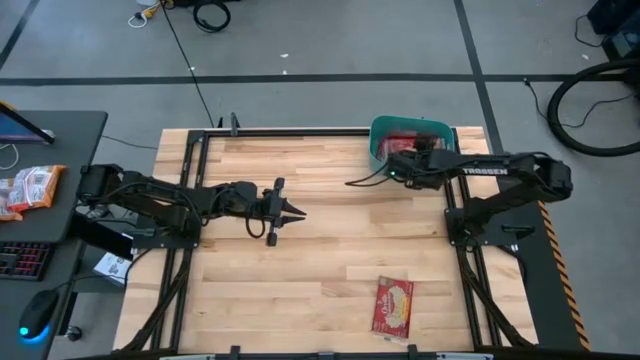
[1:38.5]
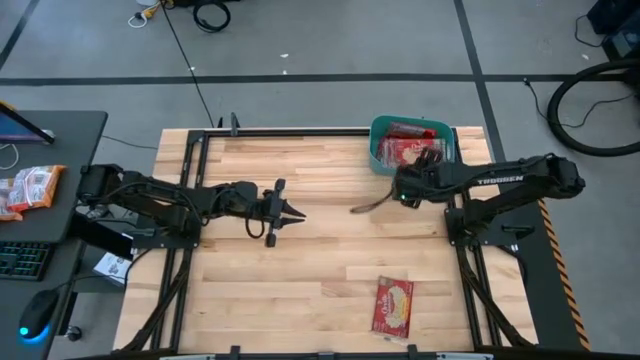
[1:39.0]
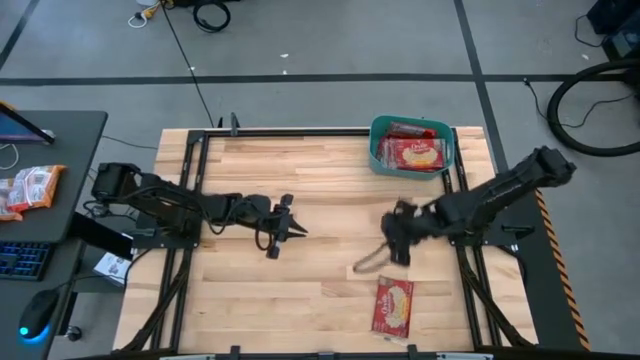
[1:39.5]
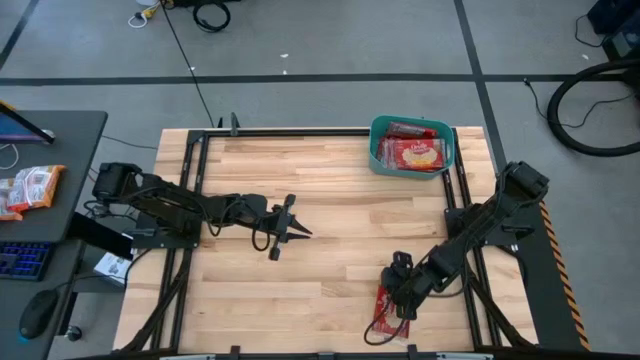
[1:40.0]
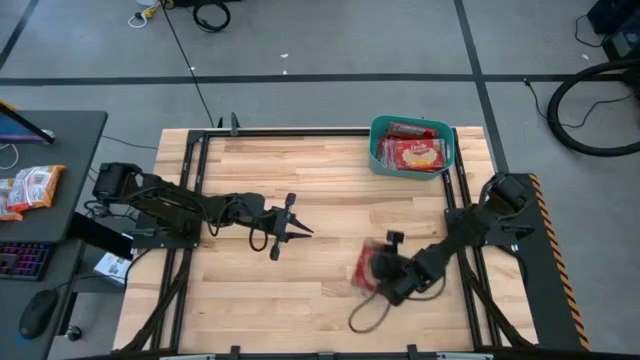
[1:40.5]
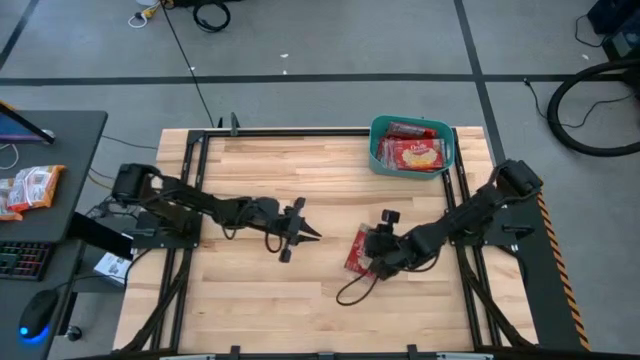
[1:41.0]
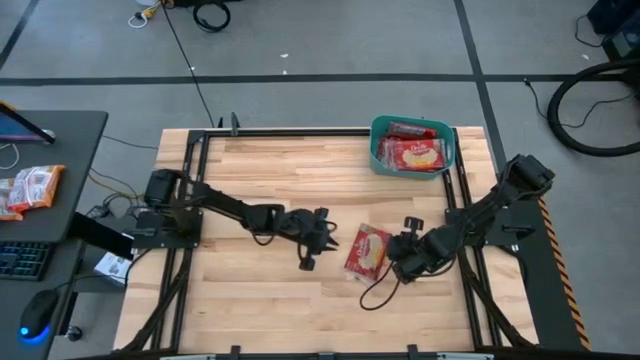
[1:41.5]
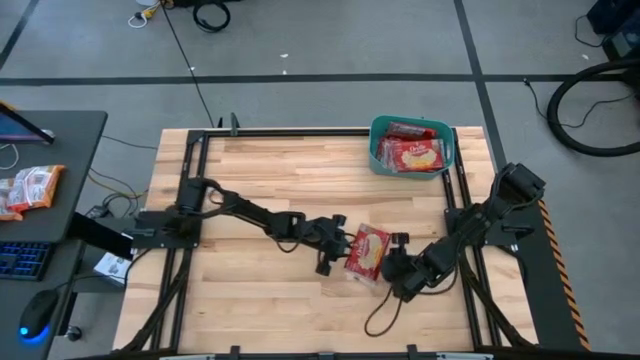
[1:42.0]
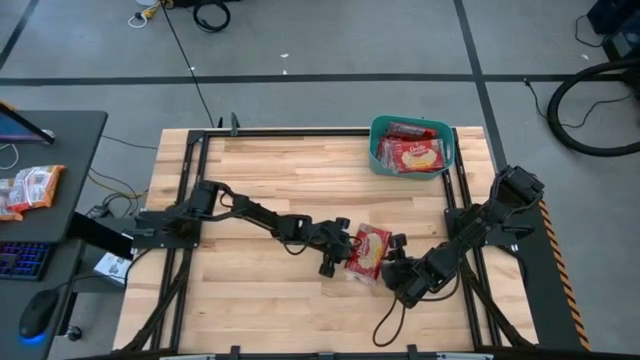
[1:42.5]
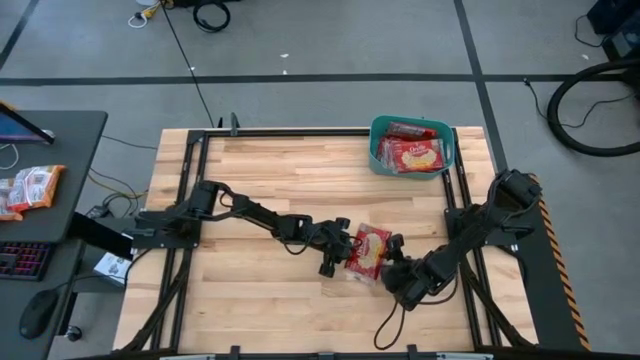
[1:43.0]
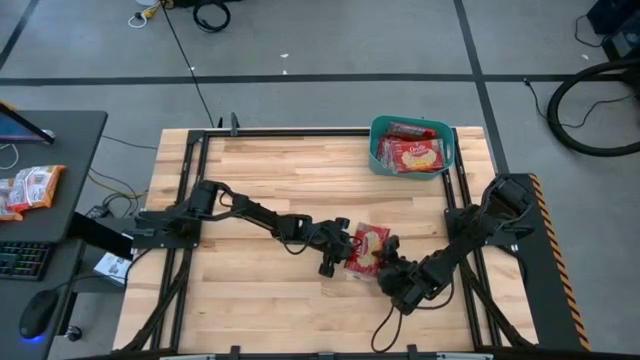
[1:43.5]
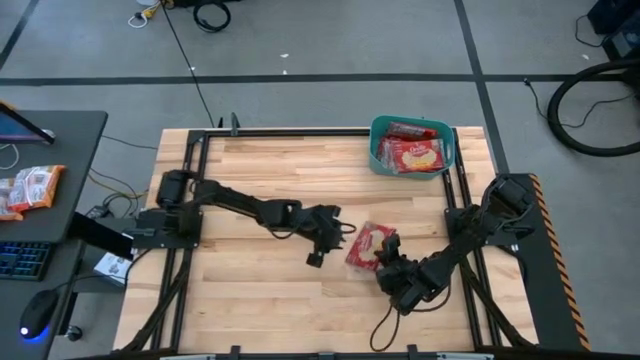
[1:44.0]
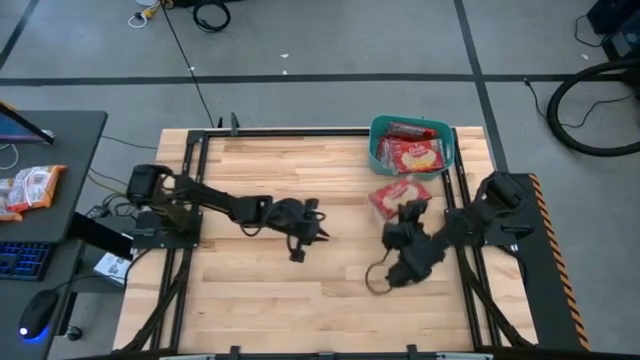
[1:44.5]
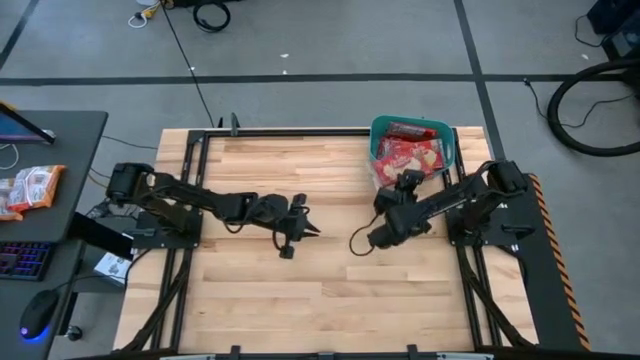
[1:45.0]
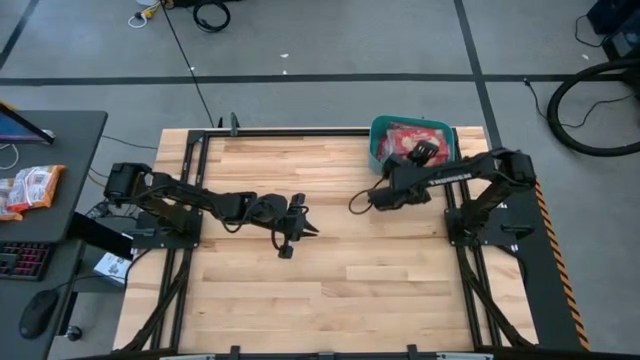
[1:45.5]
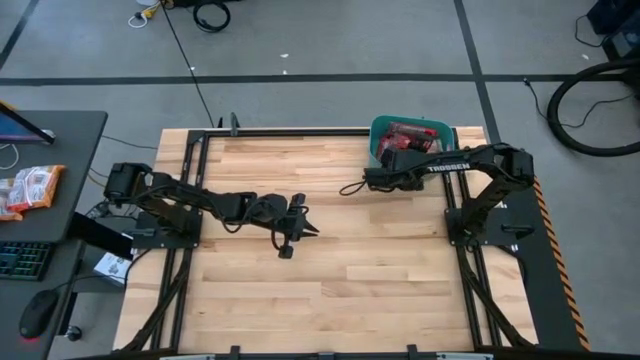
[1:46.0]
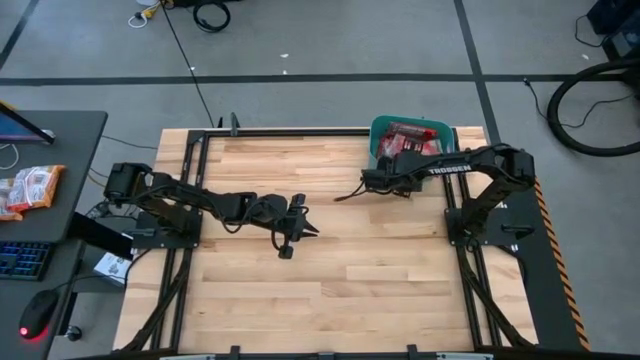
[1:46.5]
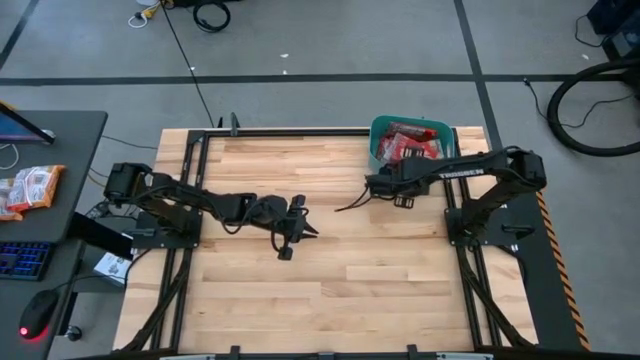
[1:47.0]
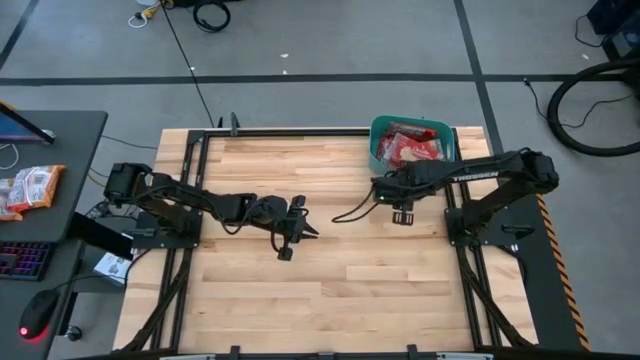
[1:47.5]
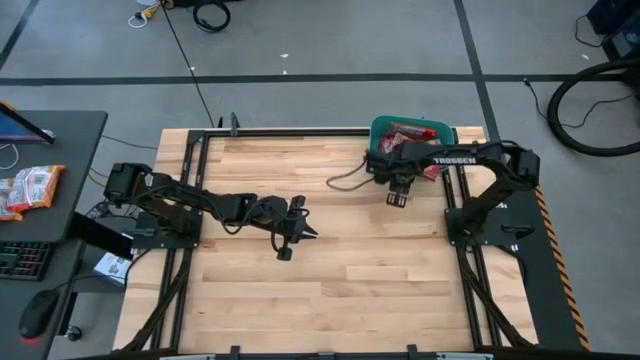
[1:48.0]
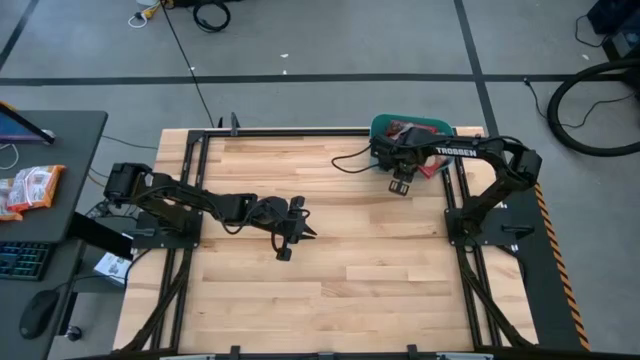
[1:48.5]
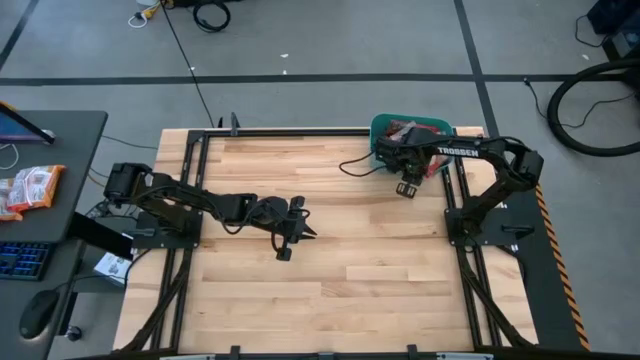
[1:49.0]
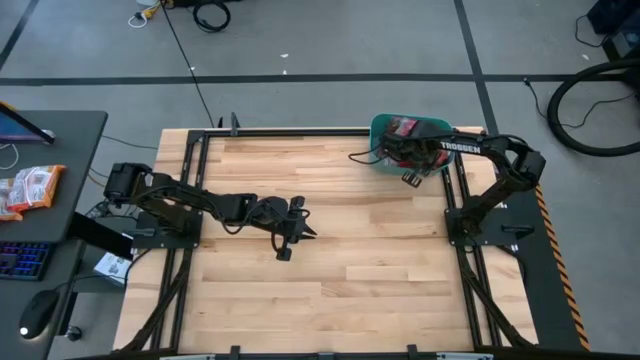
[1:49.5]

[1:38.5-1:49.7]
Task: Sort popcorn bags into baskets
Put the popcorn bag into the blue bin

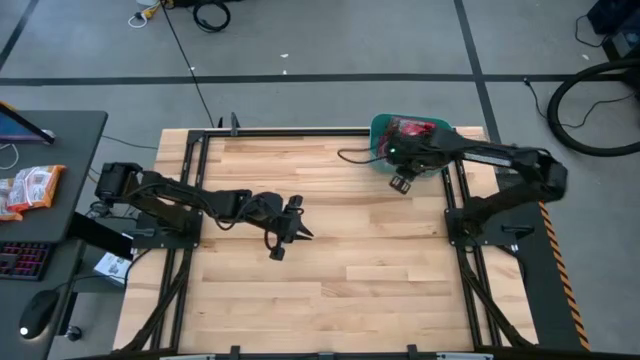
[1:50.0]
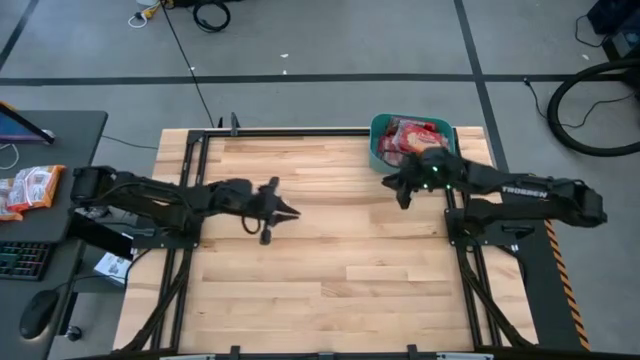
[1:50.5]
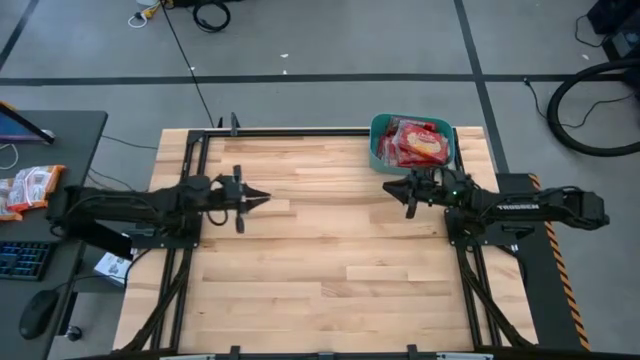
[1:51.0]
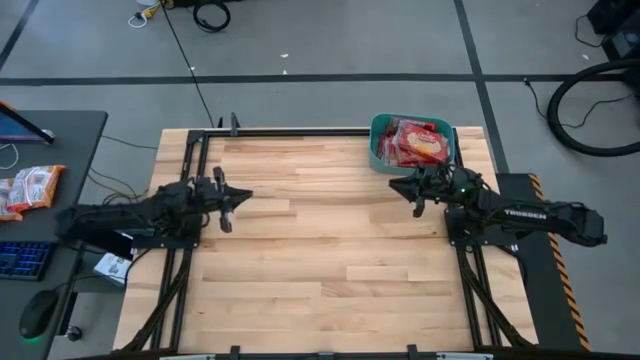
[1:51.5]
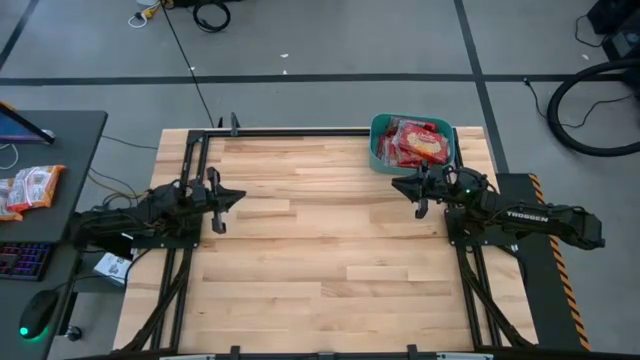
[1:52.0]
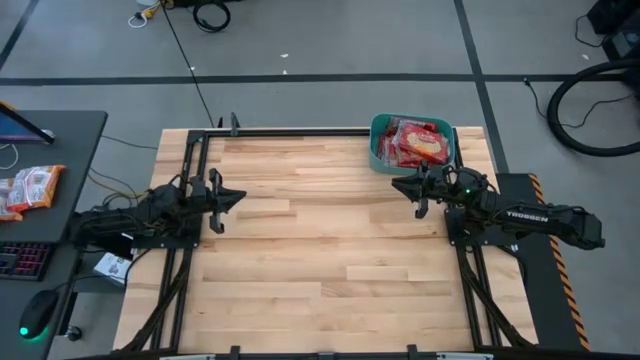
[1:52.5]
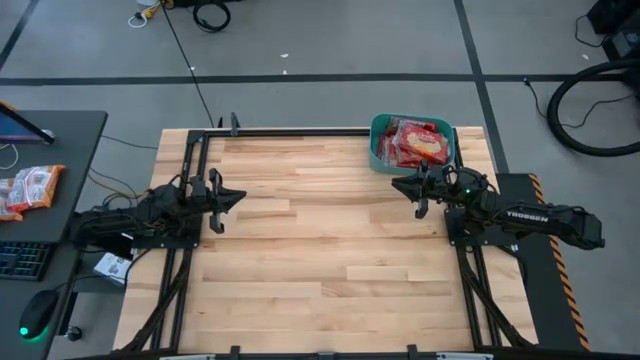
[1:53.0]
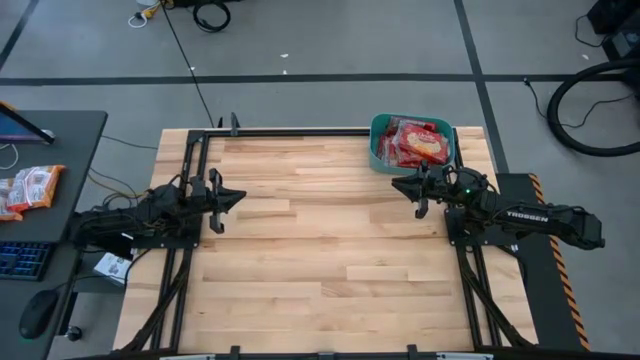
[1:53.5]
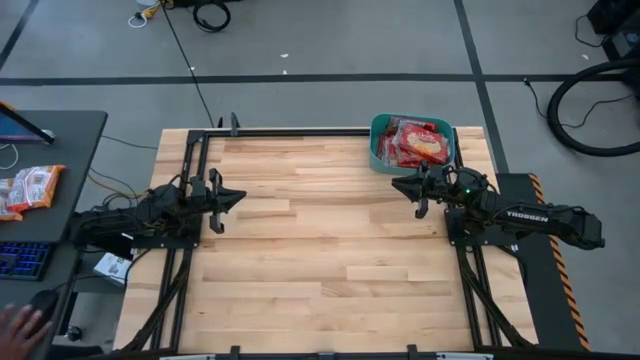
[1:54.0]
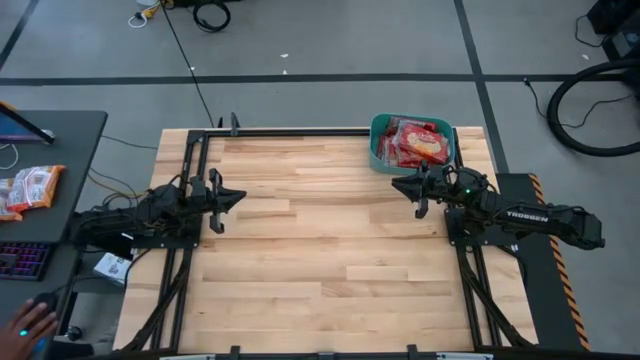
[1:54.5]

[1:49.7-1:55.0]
Return to Home Position

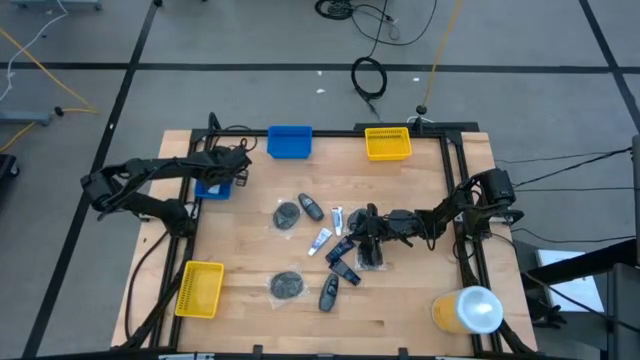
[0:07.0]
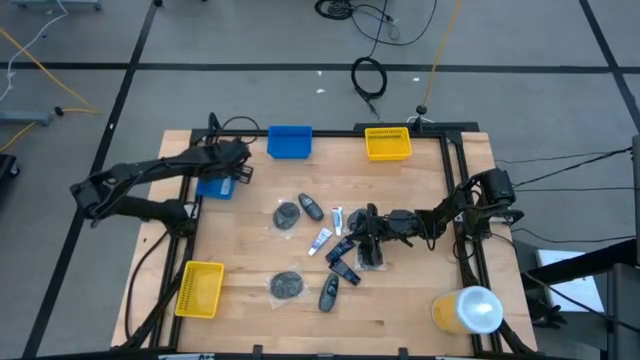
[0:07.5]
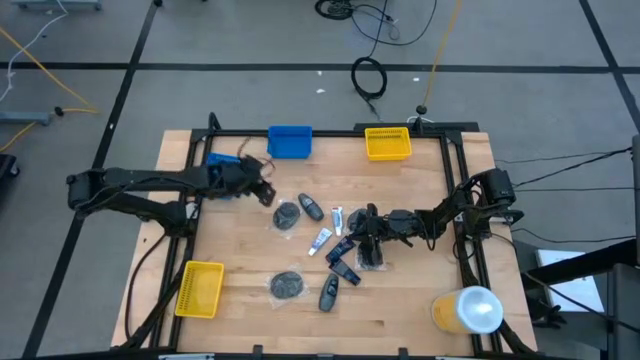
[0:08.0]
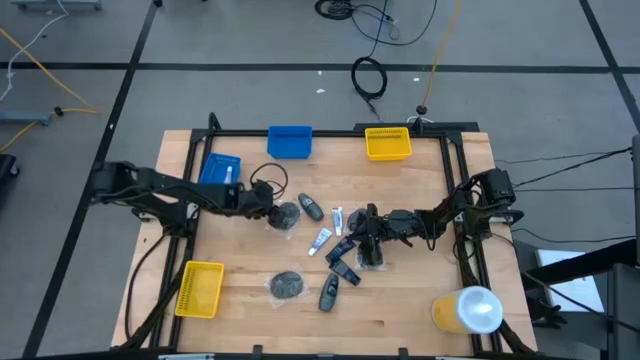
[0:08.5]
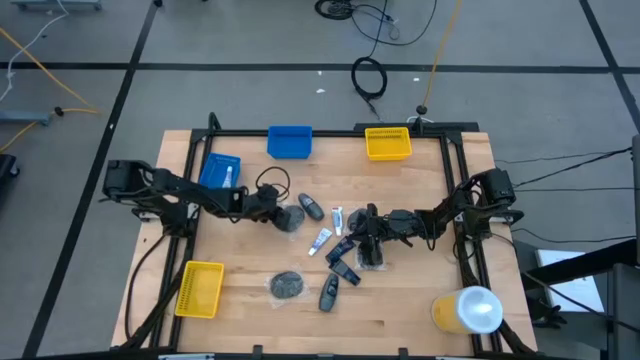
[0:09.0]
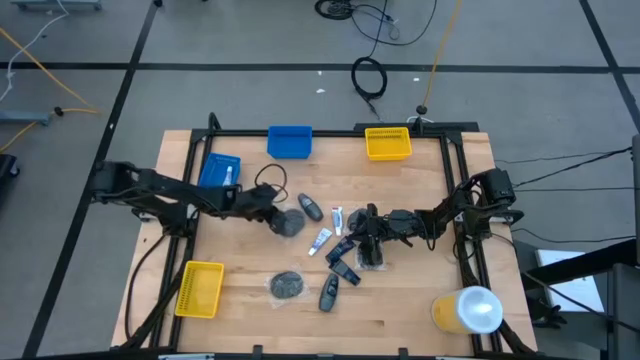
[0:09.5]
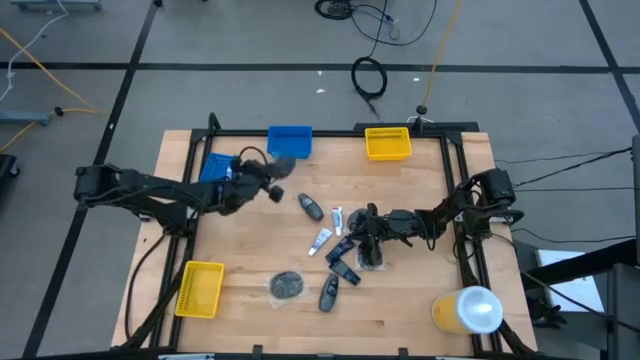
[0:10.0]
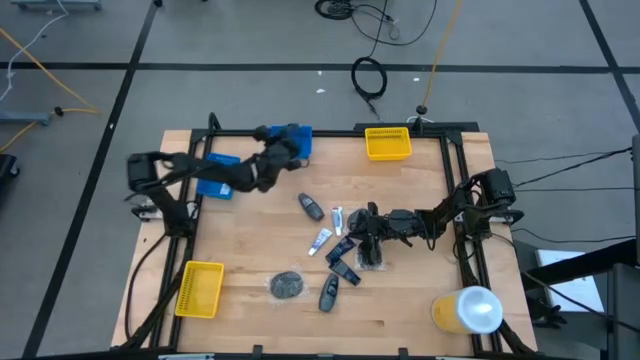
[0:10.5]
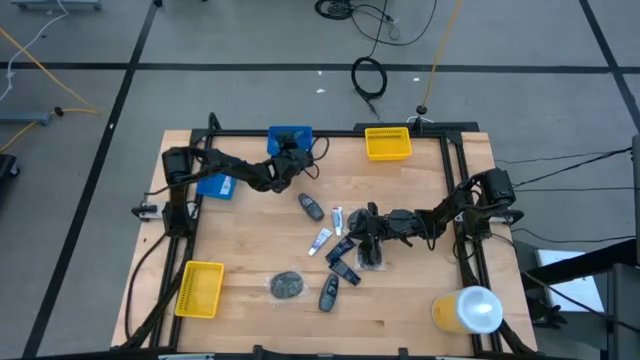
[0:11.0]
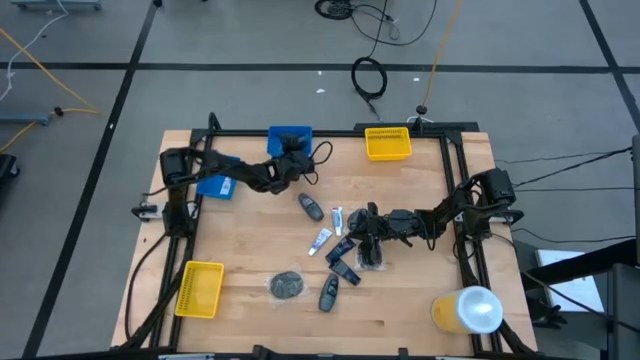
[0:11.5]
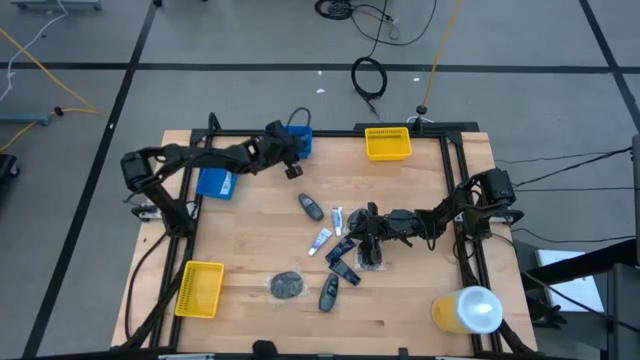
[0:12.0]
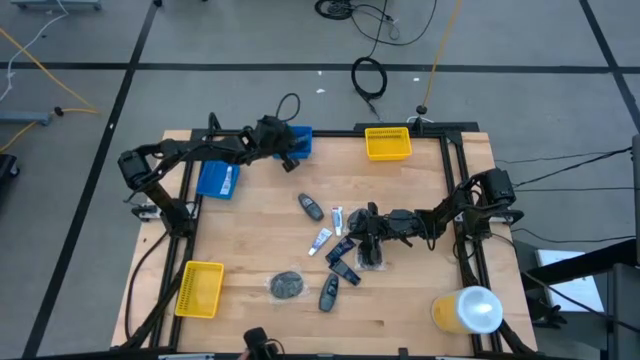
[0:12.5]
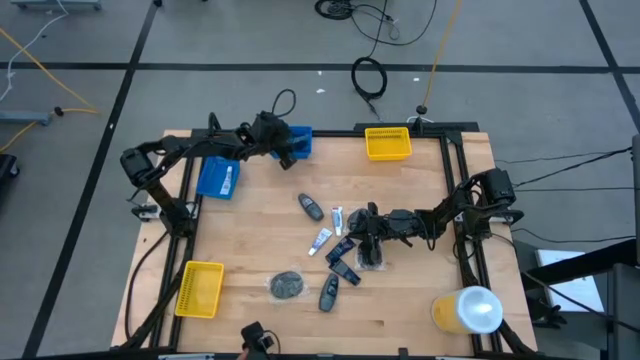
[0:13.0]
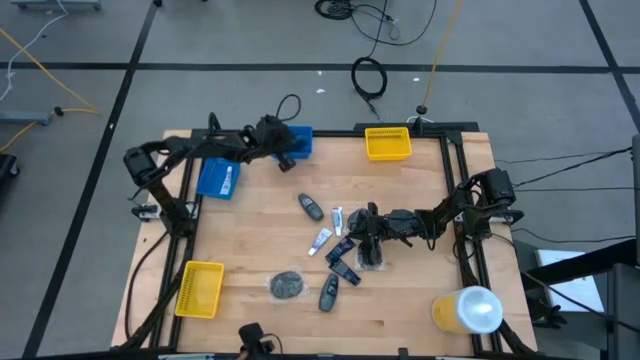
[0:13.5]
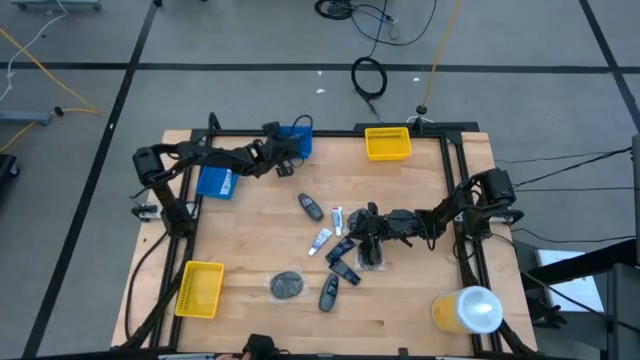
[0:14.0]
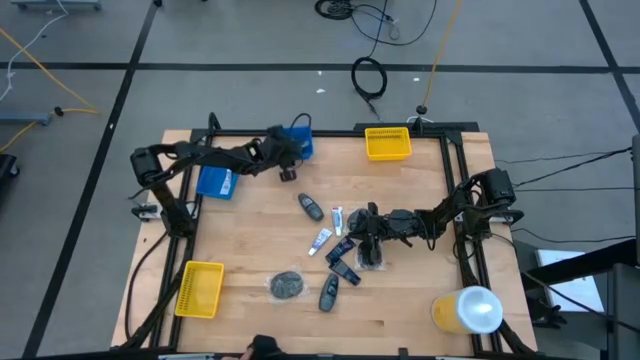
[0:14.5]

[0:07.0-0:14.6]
Task: Pick & Place Travel size toiletries
Put the black hairbrush into the right blue bin
